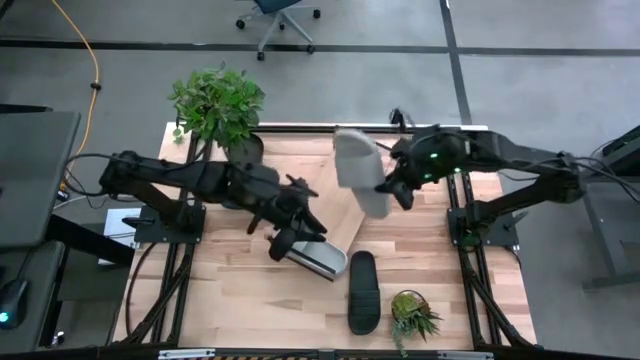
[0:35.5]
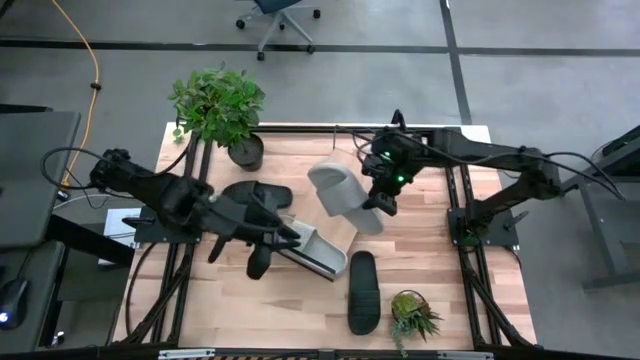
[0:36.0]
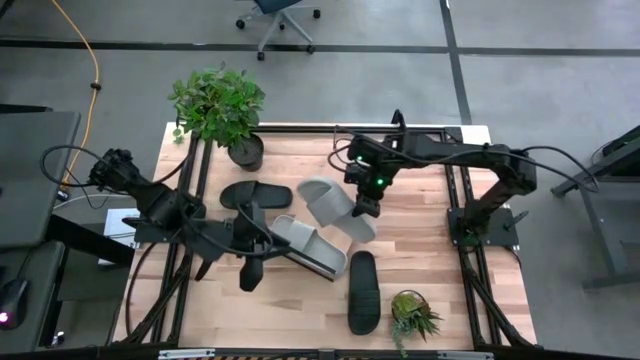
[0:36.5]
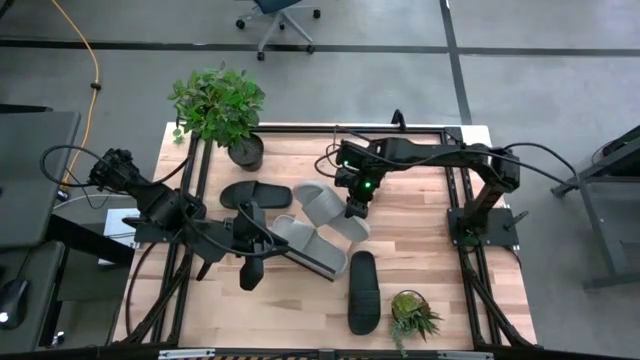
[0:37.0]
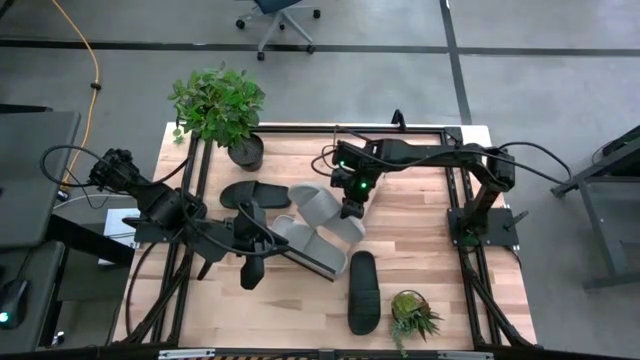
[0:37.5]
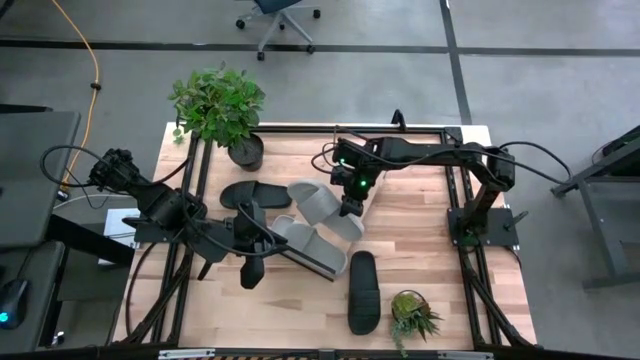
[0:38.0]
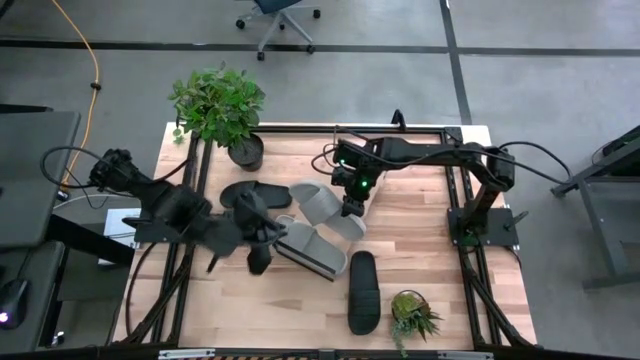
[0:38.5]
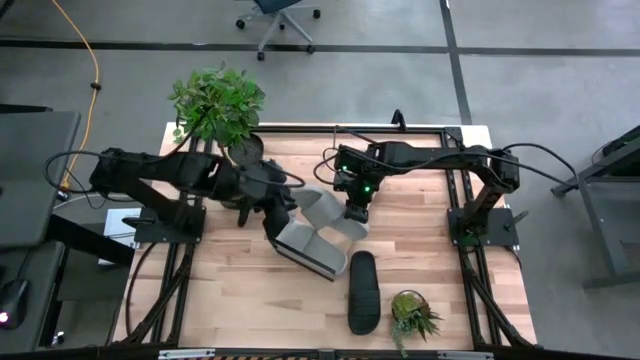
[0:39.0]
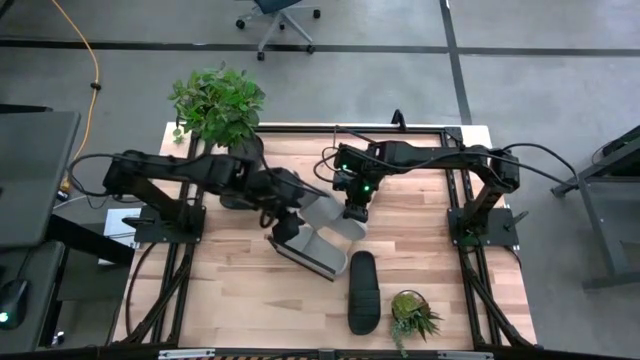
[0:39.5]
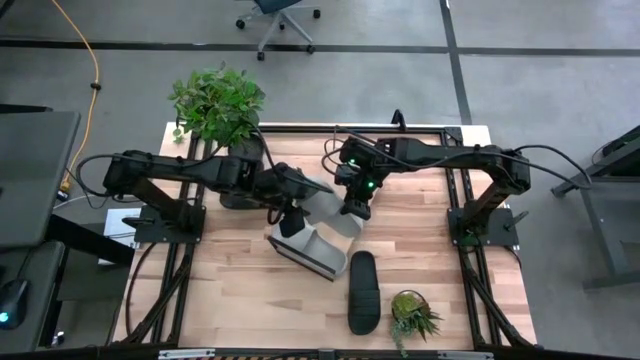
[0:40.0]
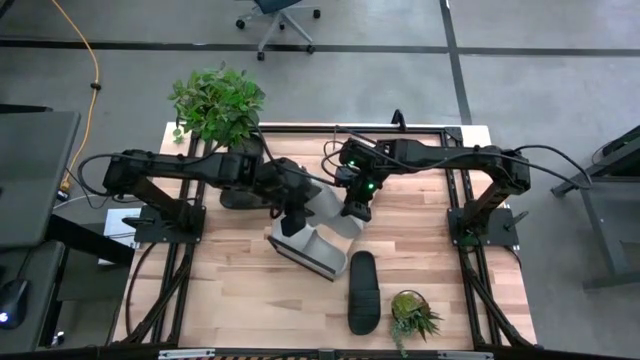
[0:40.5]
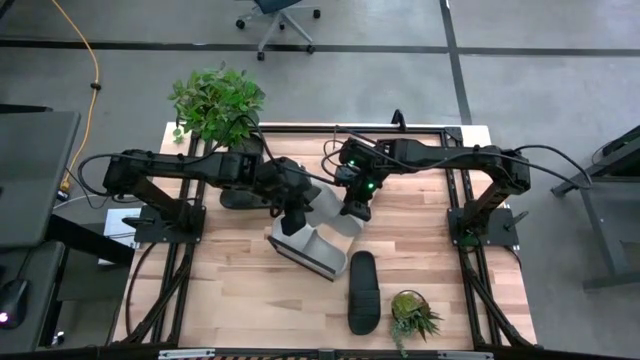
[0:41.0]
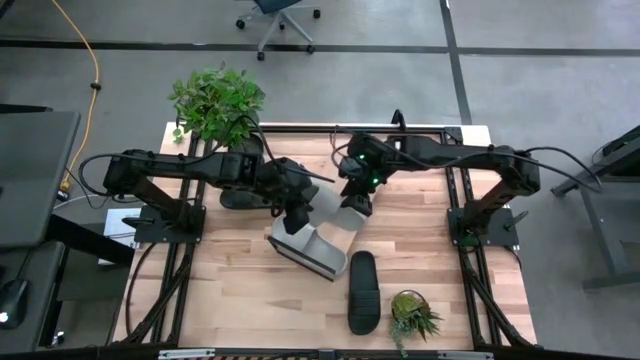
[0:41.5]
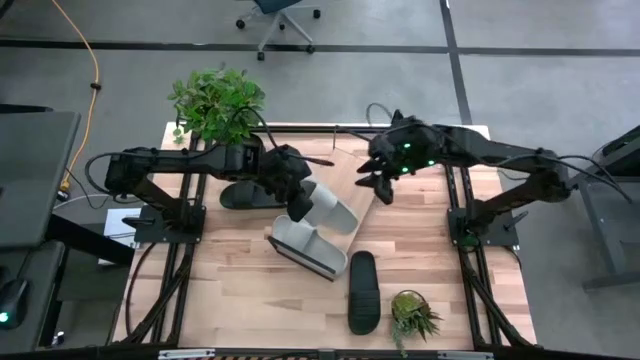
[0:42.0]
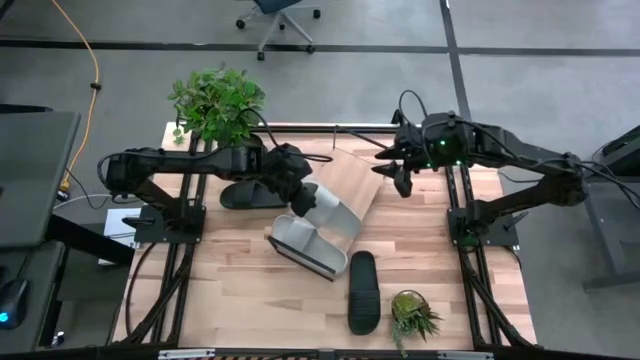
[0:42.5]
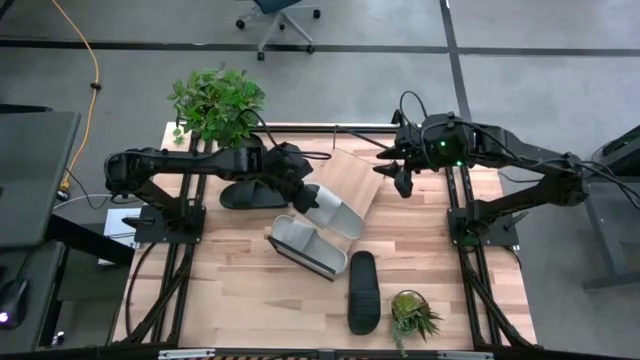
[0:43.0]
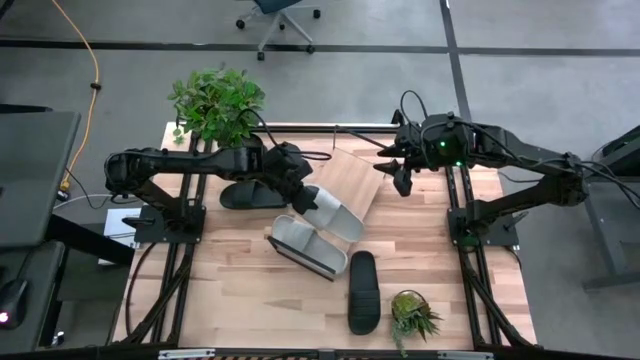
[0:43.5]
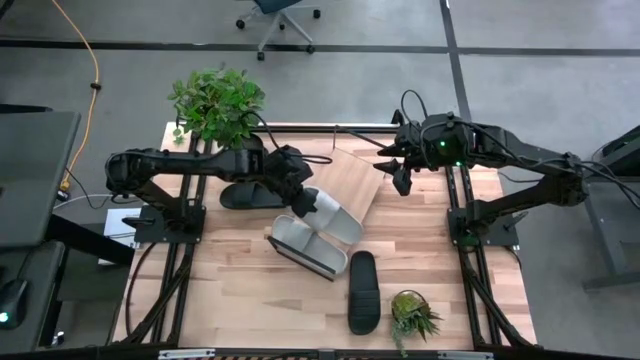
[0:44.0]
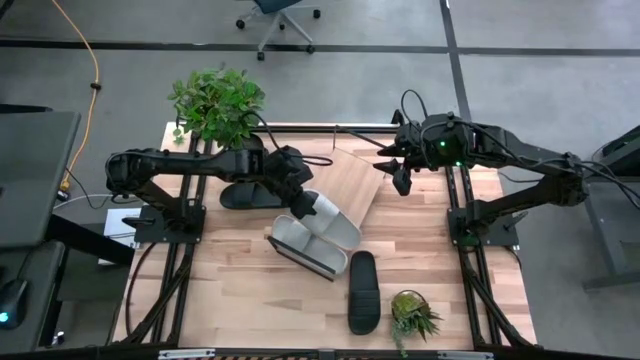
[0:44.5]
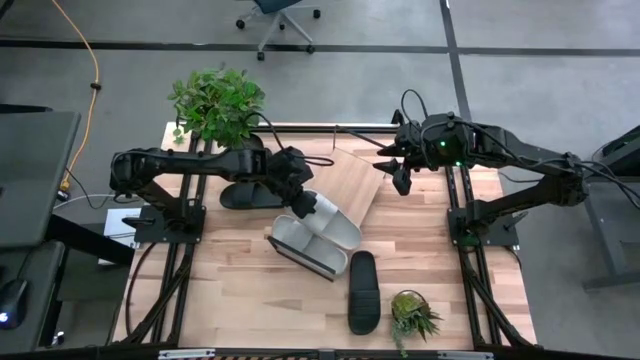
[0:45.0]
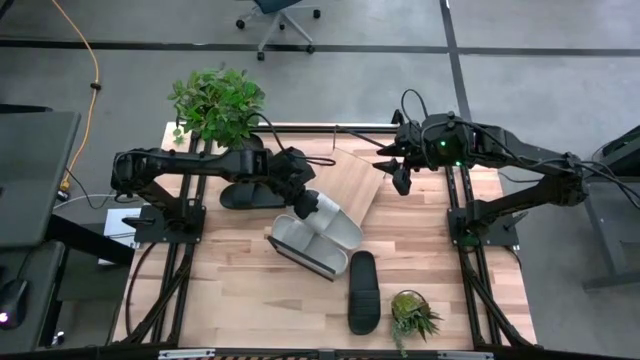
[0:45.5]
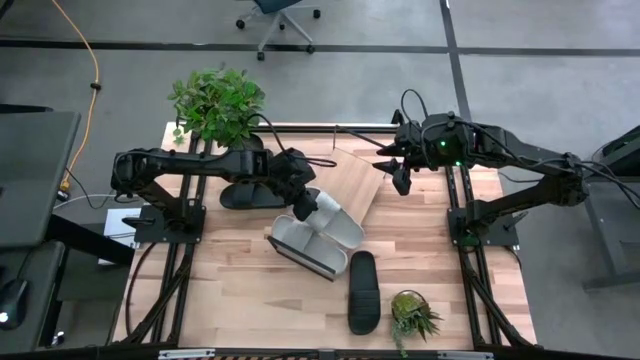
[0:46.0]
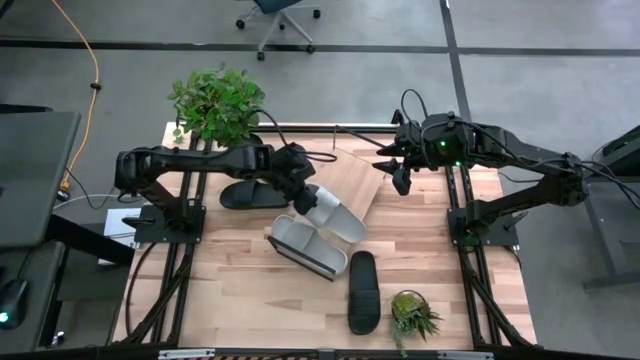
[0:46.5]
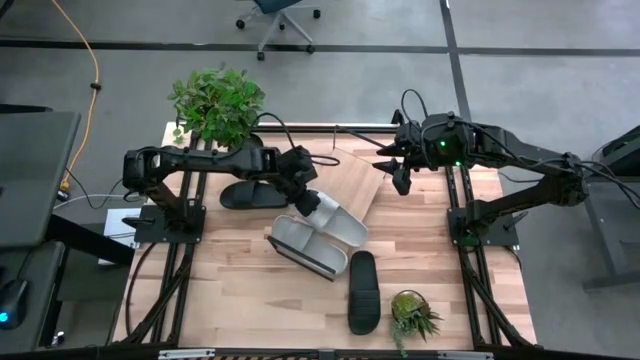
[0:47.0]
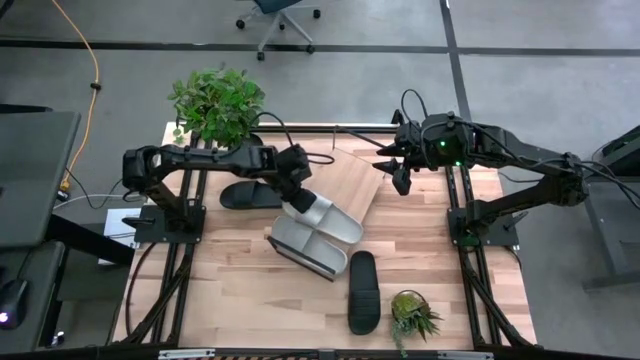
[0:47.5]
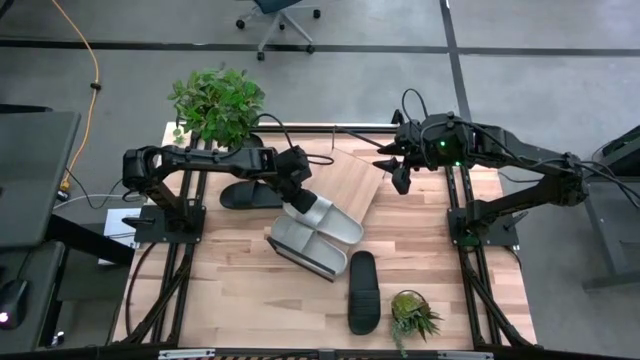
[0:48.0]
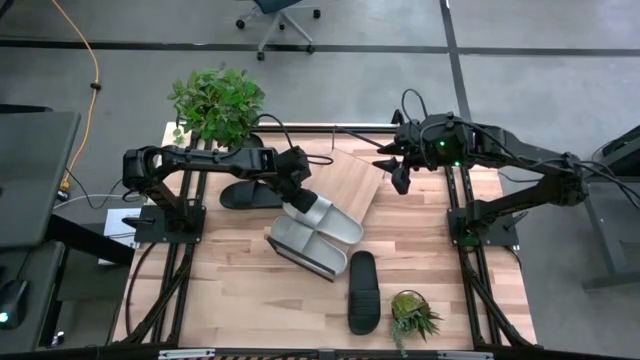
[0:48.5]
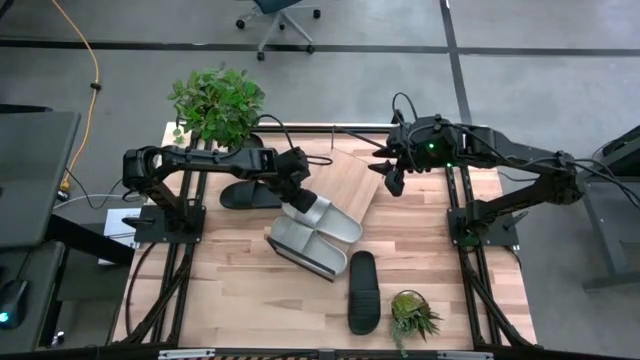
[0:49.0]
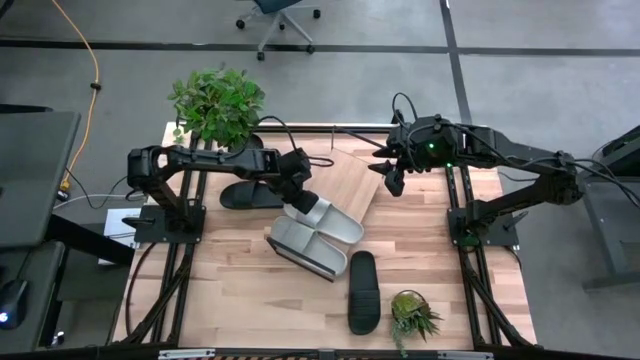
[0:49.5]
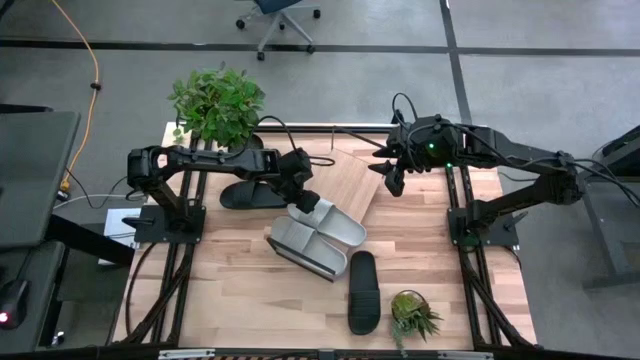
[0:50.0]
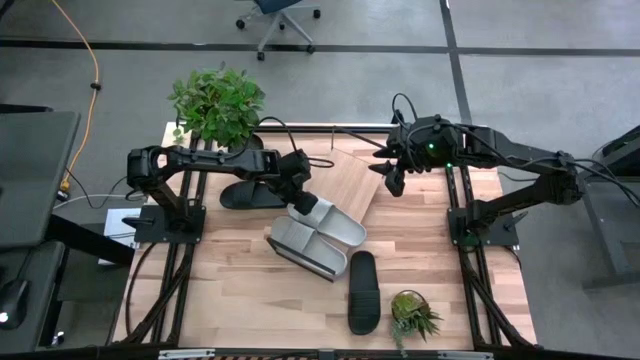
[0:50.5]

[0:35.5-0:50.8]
Task: Pick and place slides into the shelf
Put the gray slide on the shelf

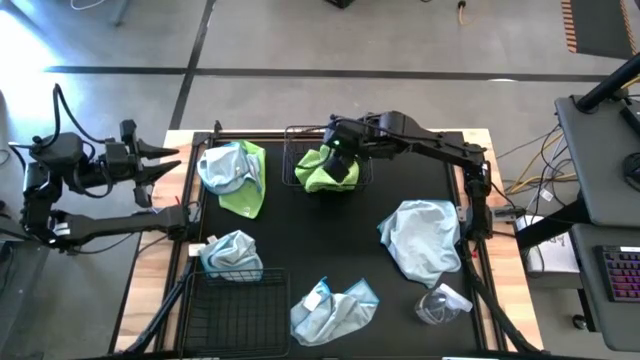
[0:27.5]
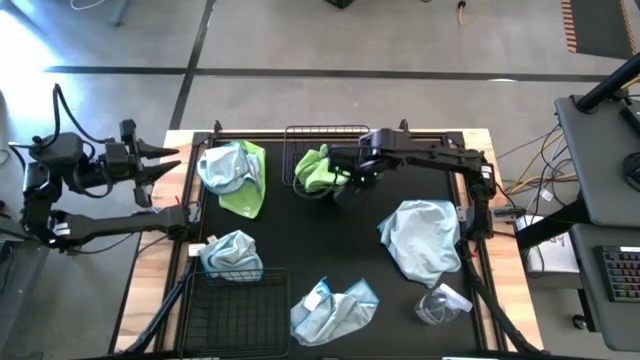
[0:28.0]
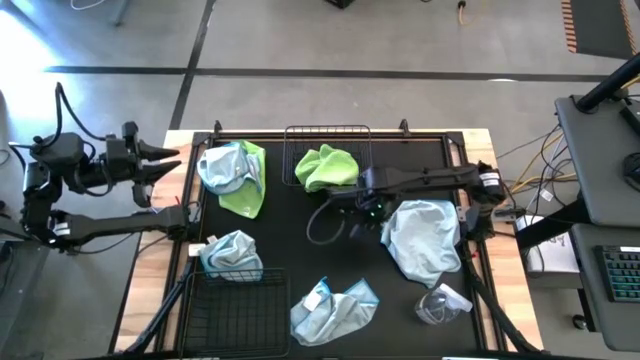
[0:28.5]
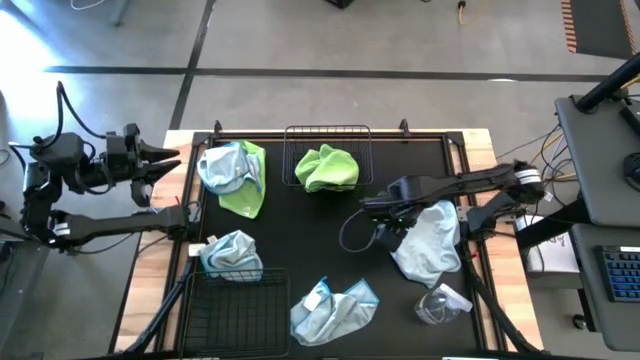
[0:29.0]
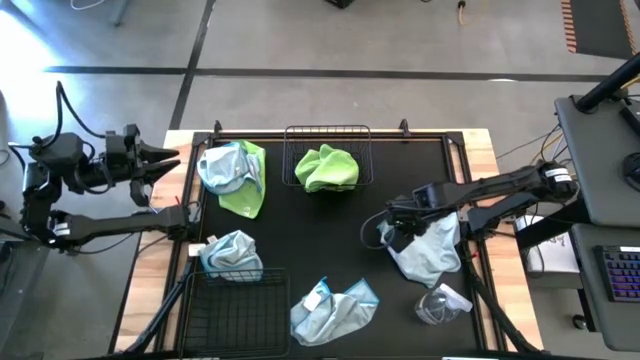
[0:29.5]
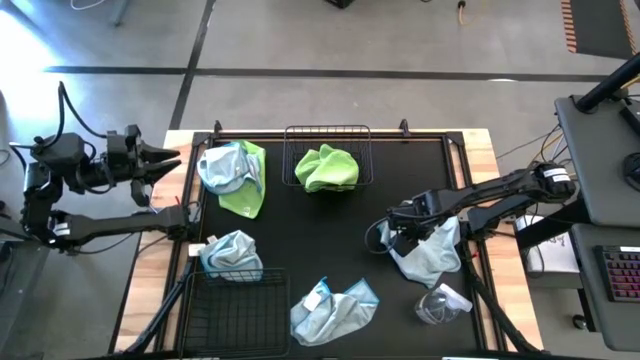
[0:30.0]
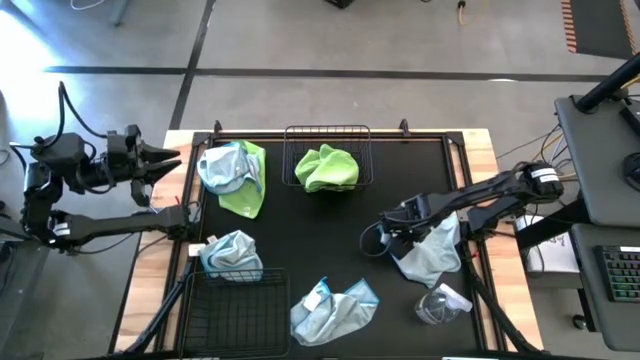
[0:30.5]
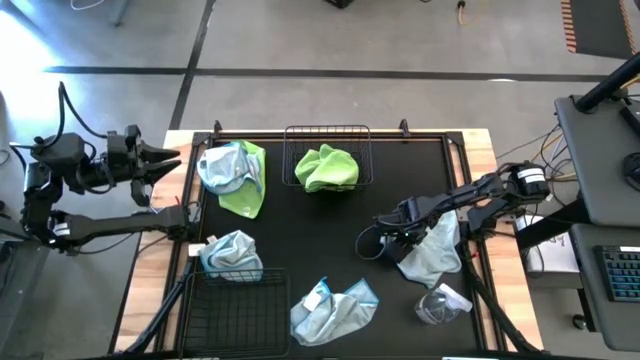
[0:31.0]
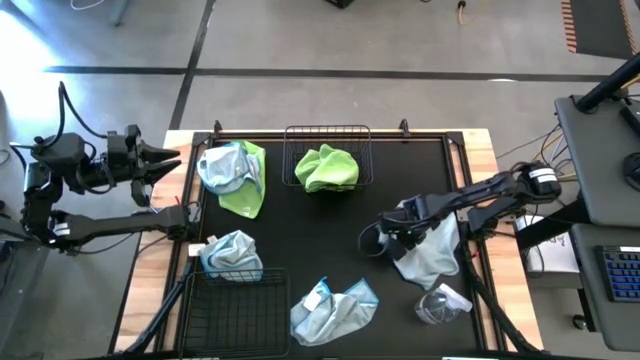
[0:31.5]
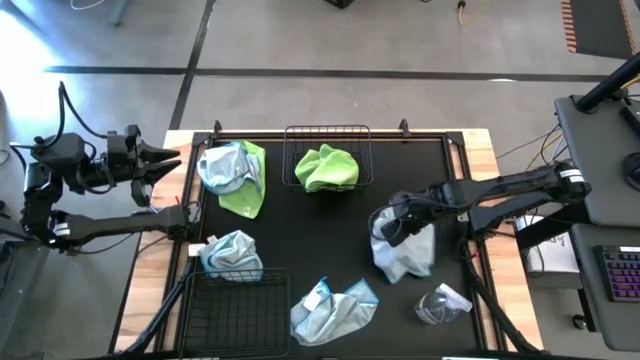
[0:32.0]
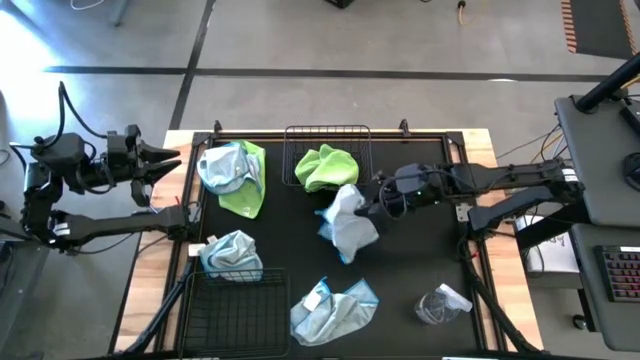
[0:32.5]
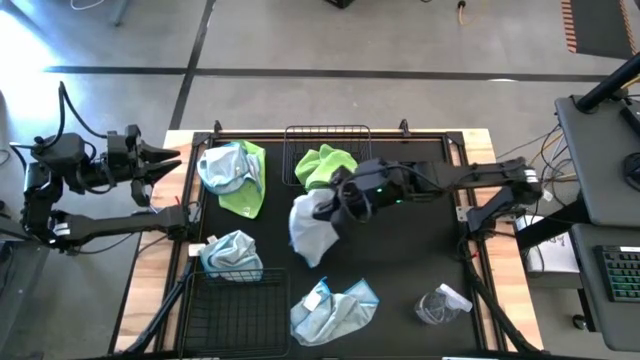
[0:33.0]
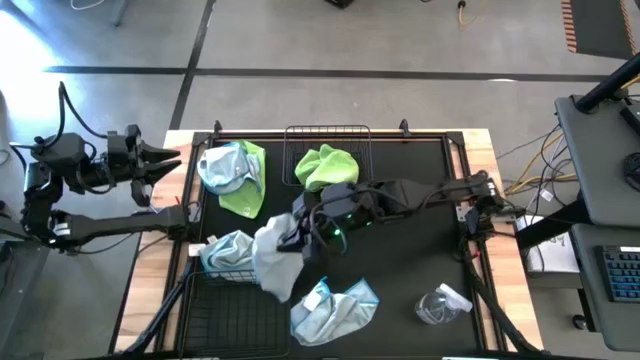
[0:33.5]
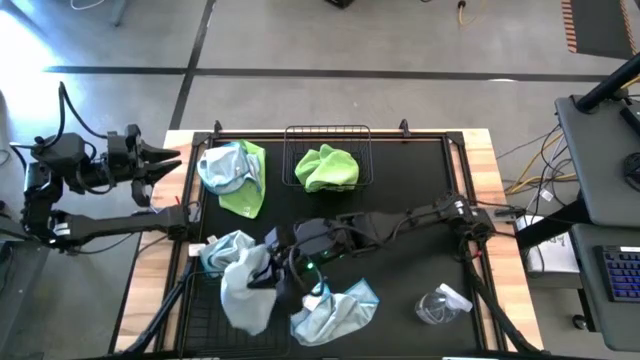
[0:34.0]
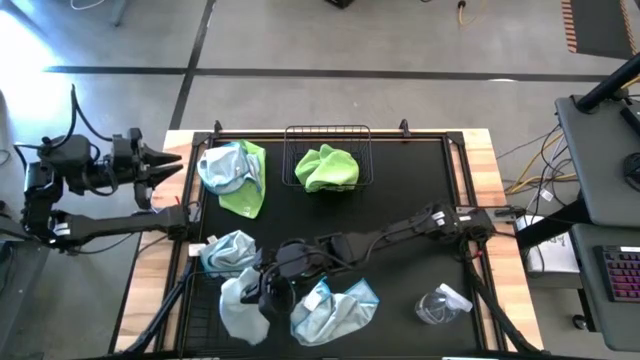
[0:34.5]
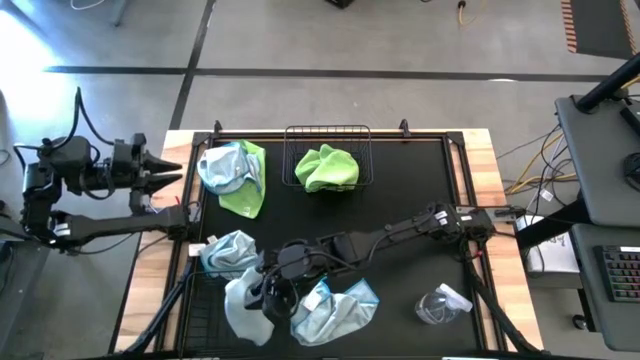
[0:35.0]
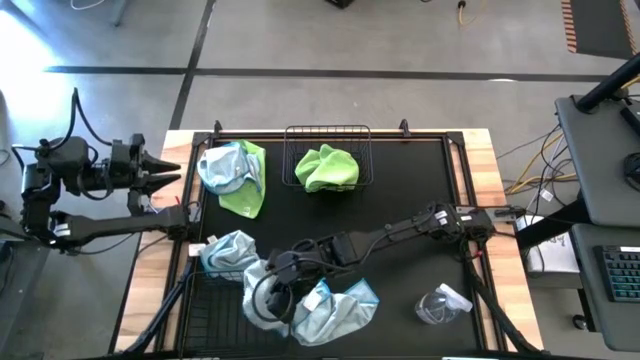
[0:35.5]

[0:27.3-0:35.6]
Task: Sort microfiber towel by color & place in baskets
Put the blue microfiber towel into the bottom black wire basket
